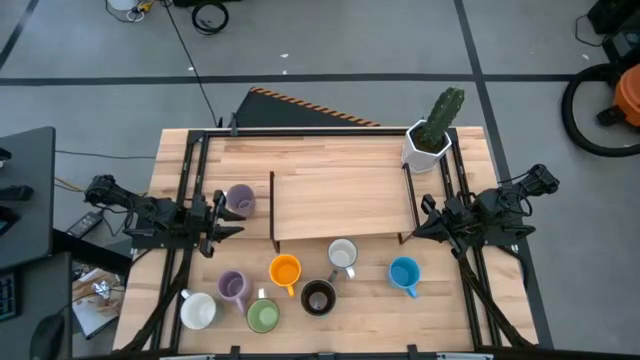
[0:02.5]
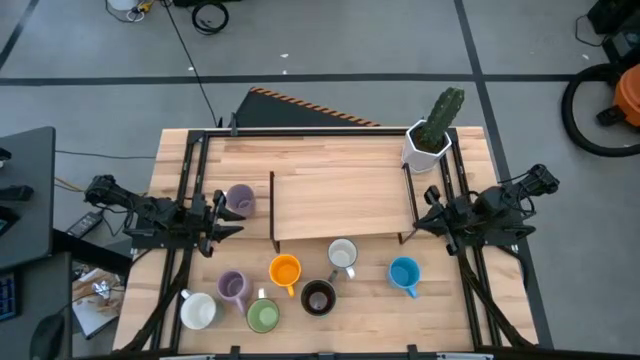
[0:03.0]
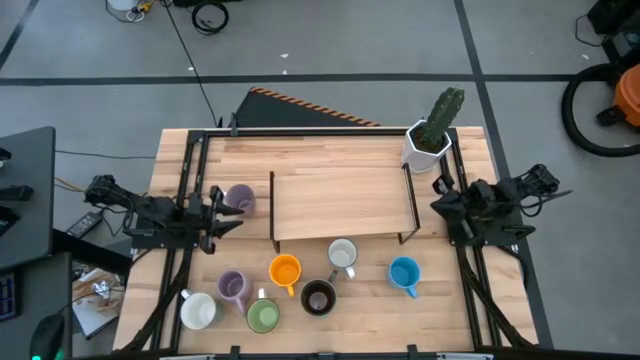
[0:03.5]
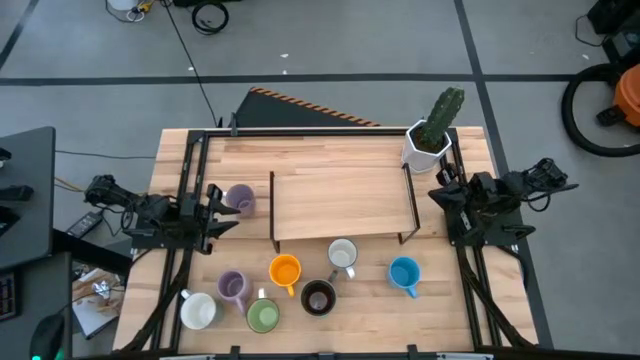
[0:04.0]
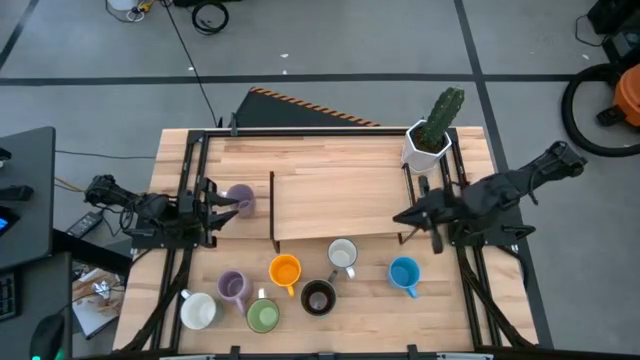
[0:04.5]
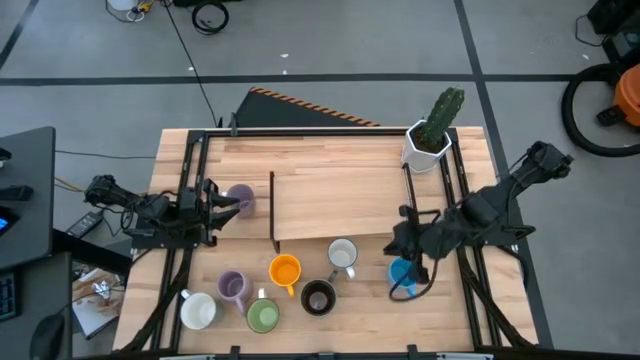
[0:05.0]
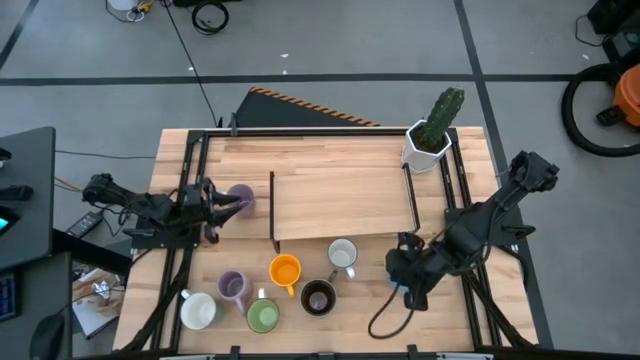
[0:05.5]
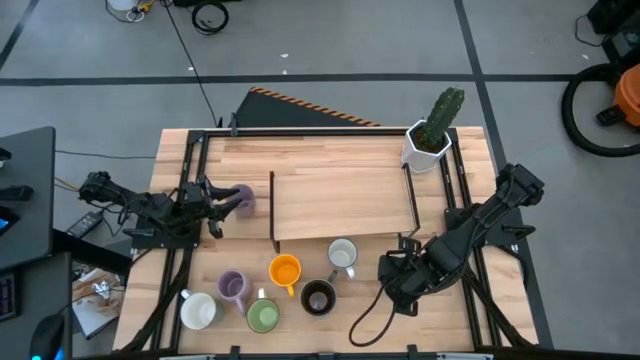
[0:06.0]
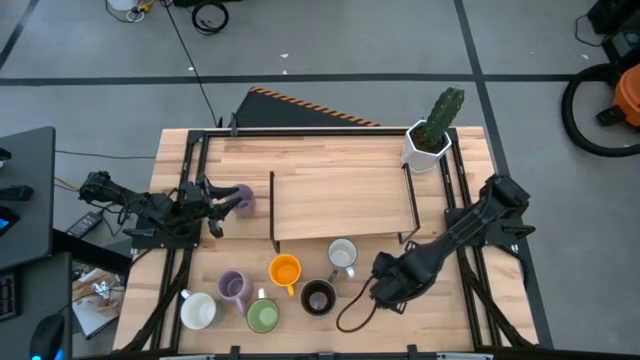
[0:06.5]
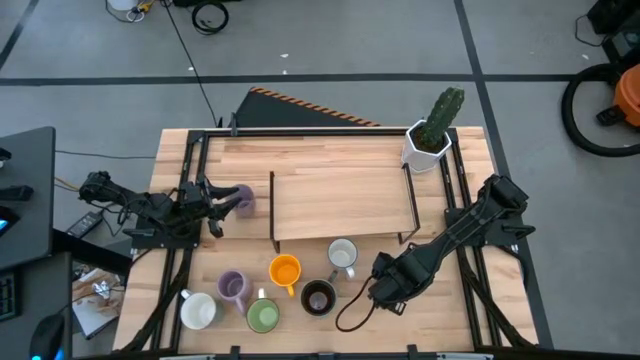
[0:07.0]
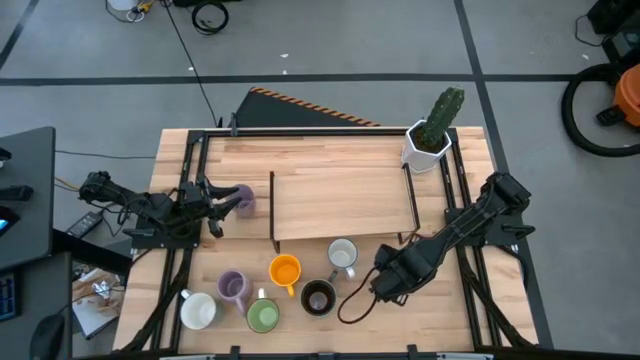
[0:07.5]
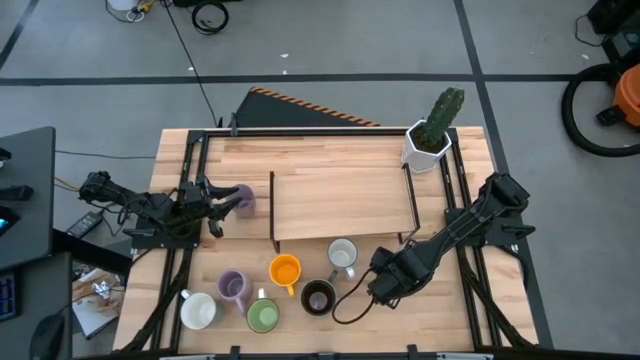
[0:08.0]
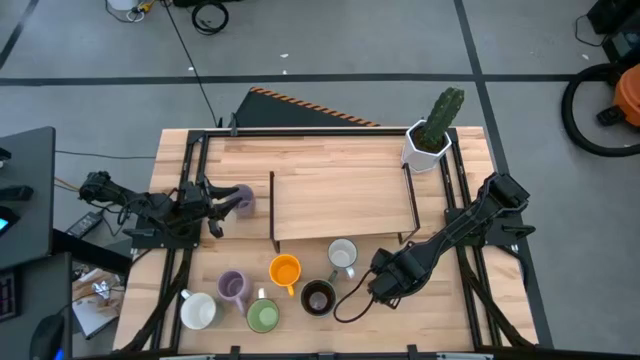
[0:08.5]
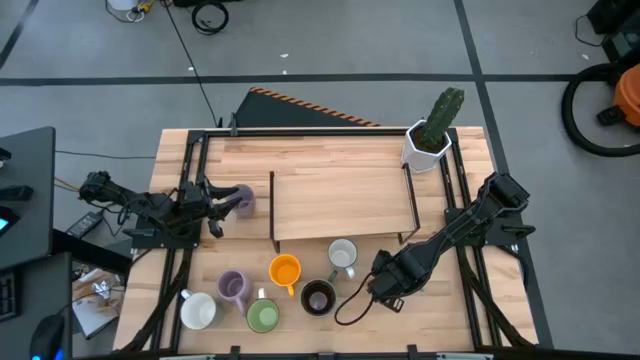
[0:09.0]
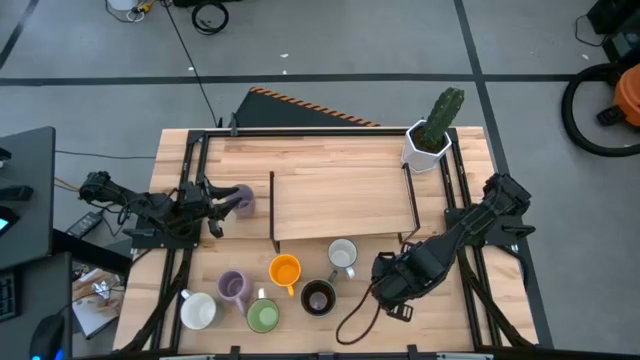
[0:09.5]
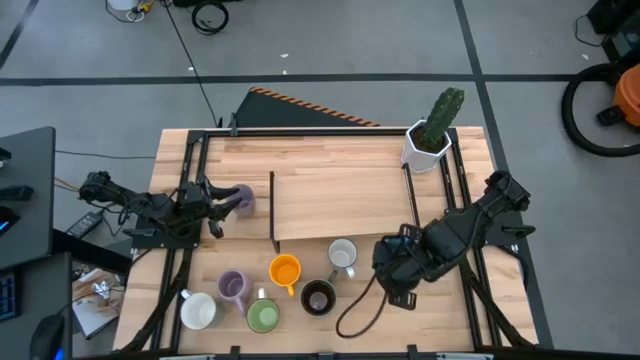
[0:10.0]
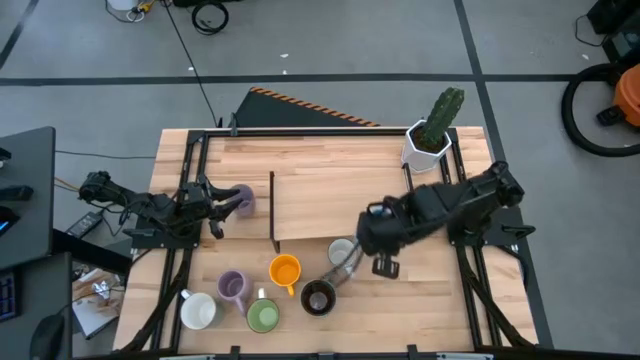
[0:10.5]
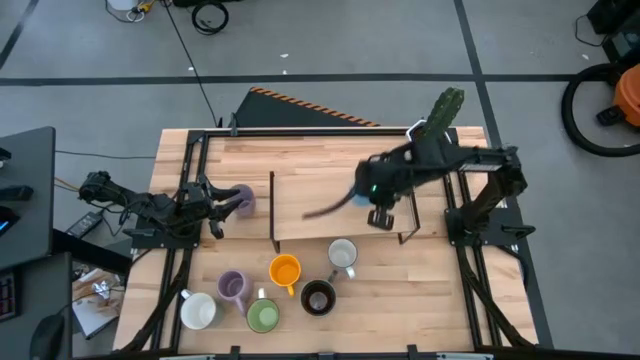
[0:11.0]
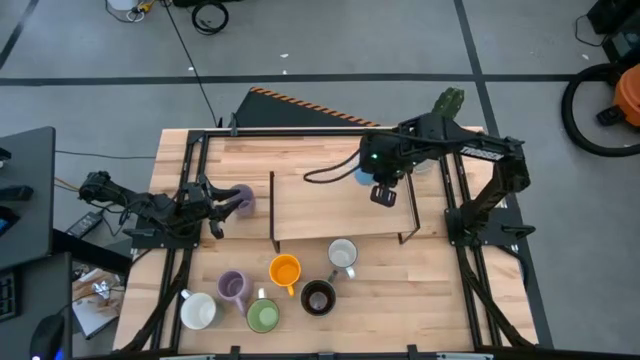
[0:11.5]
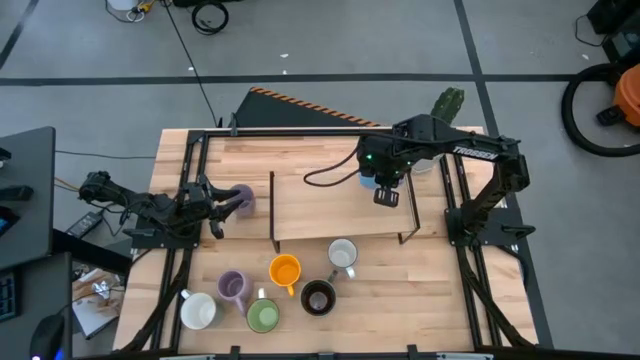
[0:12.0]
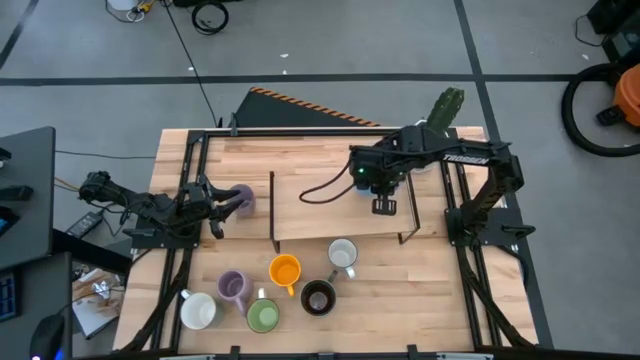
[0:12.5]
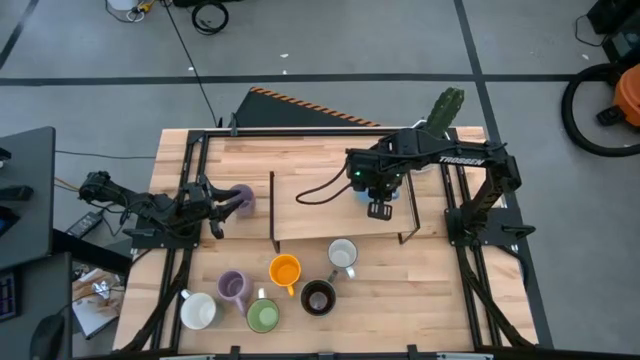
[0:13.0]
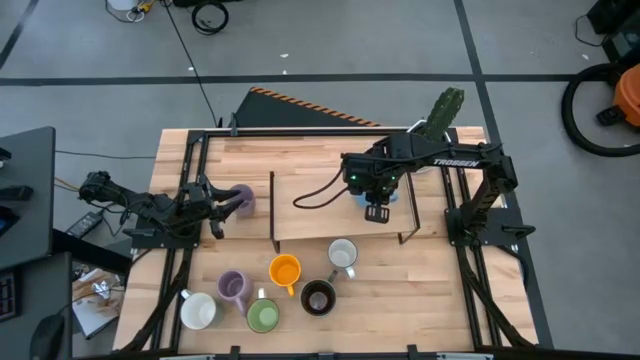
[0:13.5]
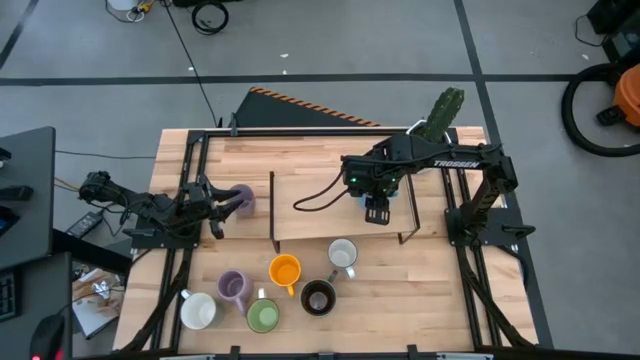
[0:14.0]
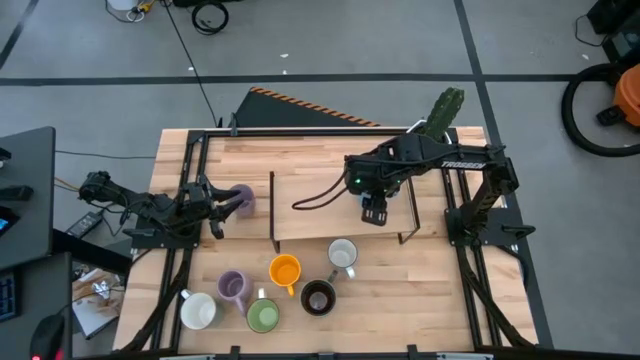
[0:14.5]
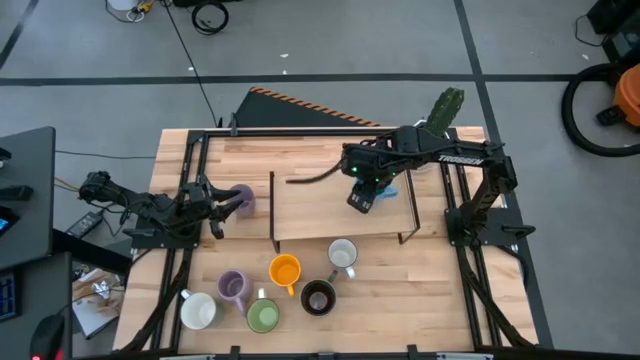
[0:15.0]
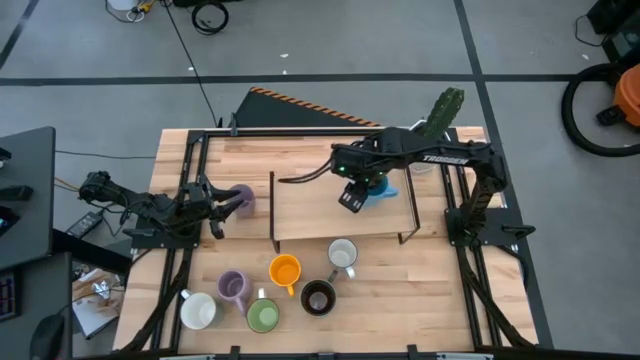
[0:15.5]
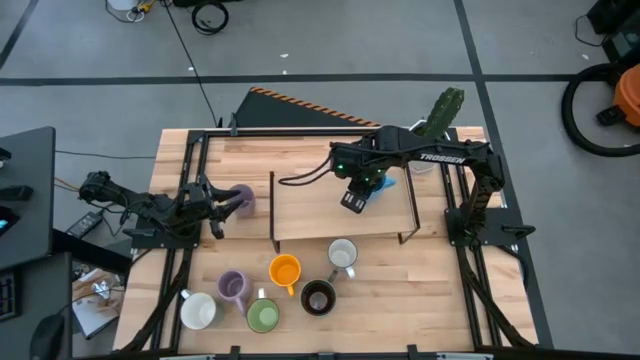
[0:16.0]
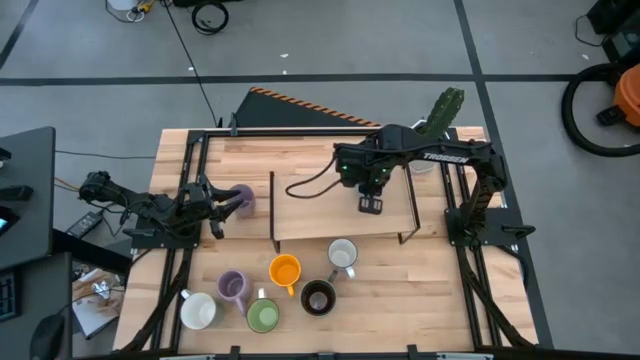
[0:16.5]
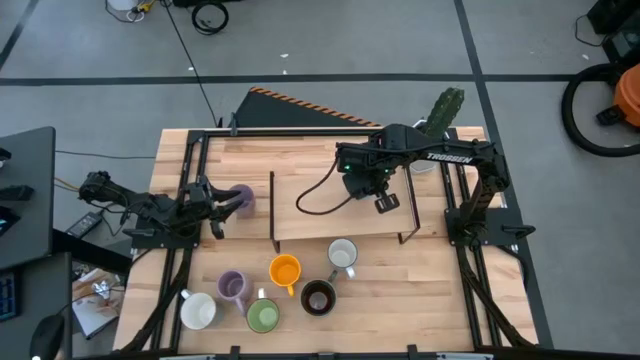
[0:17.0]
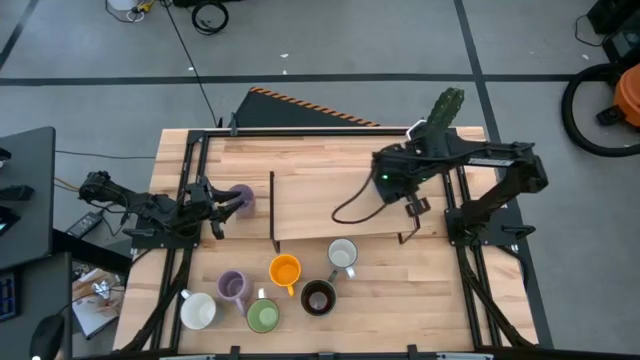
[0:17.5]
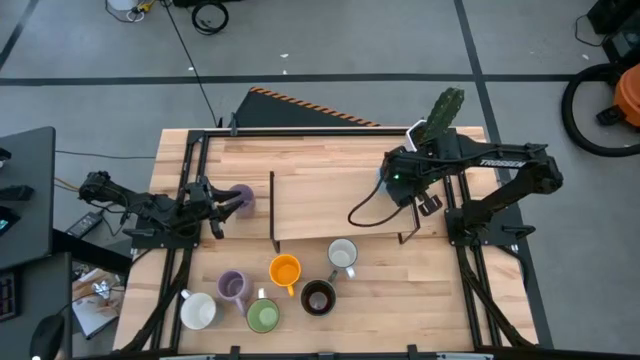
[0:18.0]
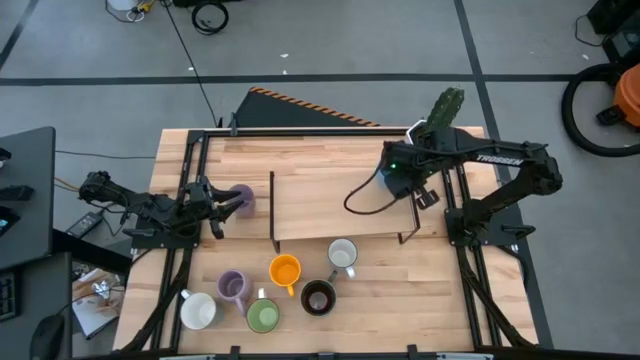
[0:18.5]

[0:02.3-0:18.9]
Task: Place coffee mugs
Put the blue cup on the shelf
